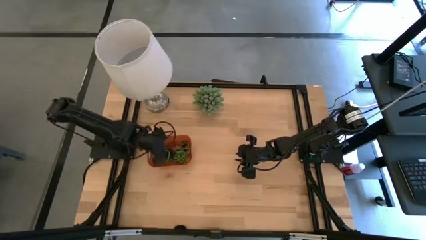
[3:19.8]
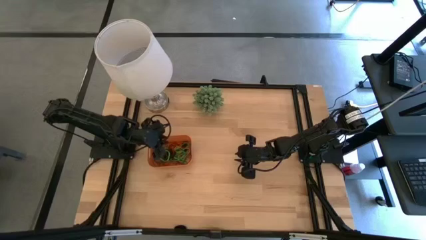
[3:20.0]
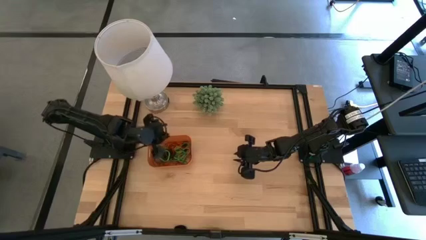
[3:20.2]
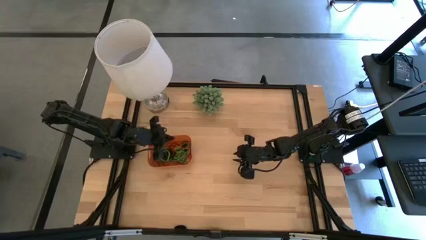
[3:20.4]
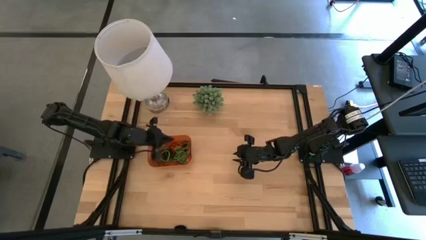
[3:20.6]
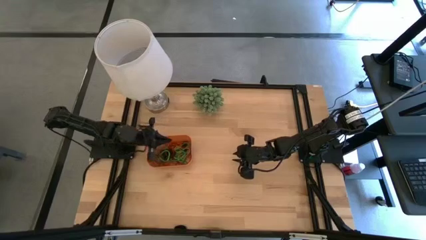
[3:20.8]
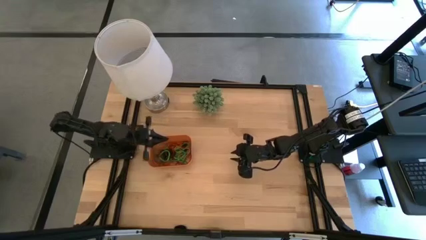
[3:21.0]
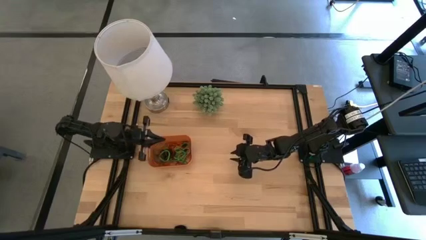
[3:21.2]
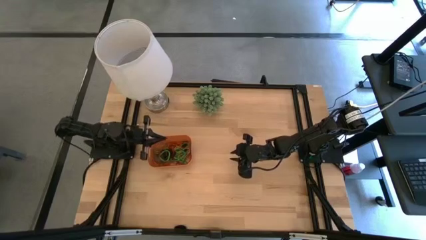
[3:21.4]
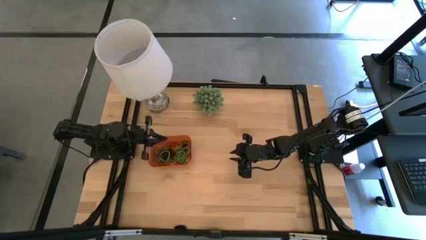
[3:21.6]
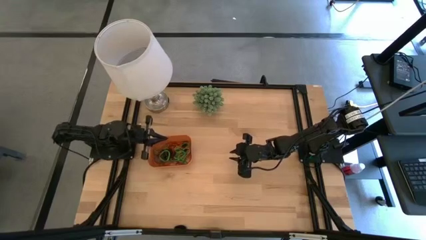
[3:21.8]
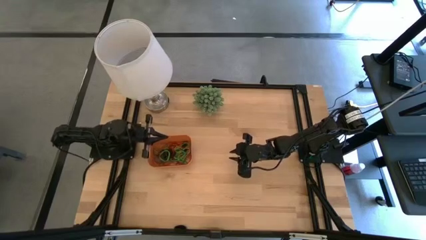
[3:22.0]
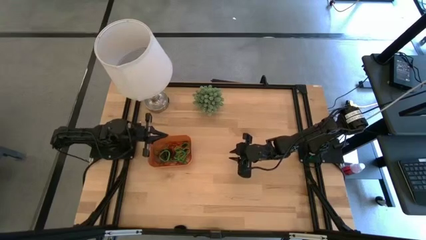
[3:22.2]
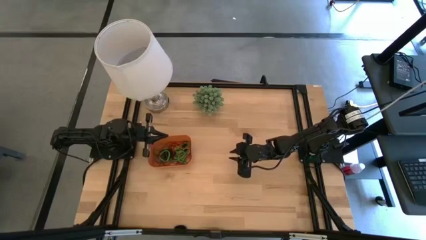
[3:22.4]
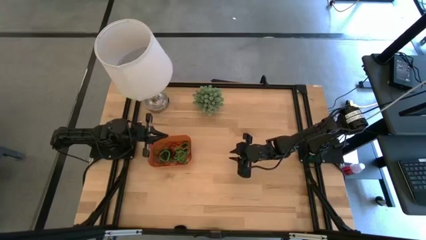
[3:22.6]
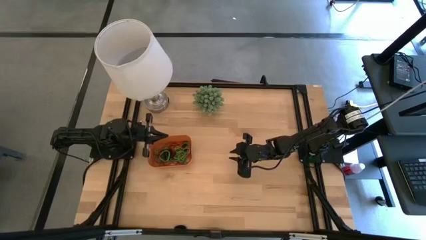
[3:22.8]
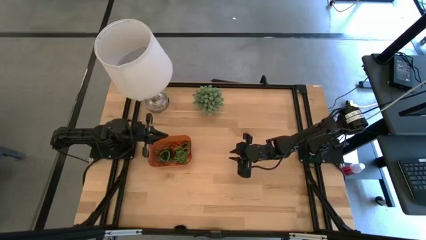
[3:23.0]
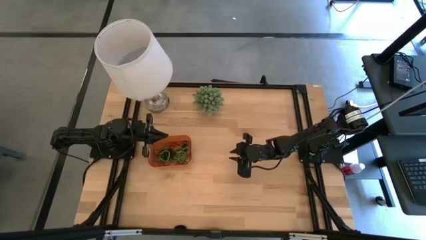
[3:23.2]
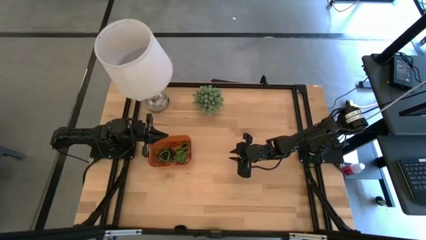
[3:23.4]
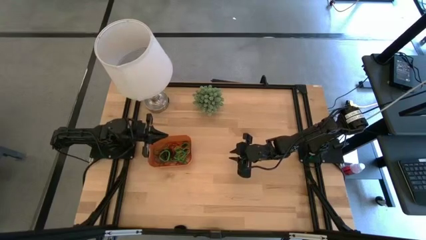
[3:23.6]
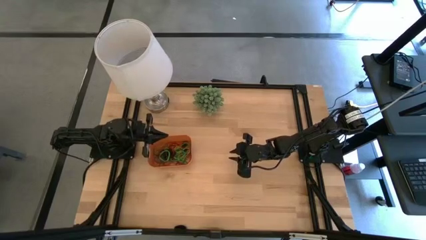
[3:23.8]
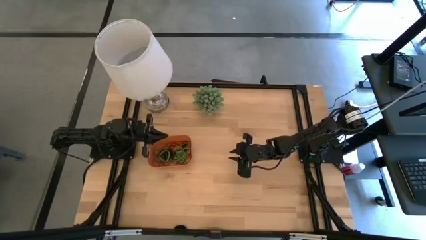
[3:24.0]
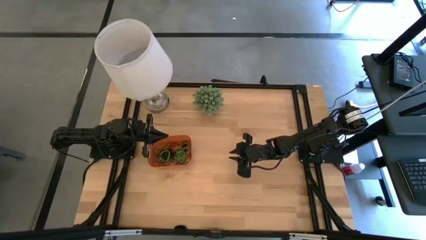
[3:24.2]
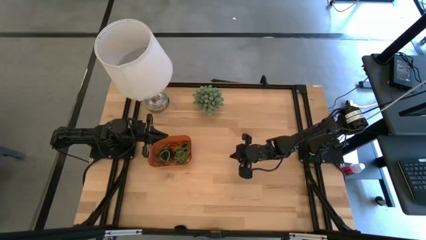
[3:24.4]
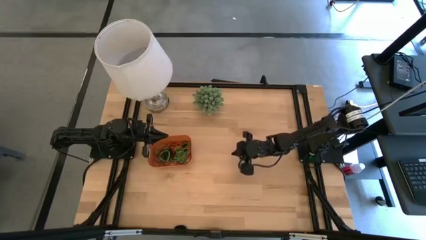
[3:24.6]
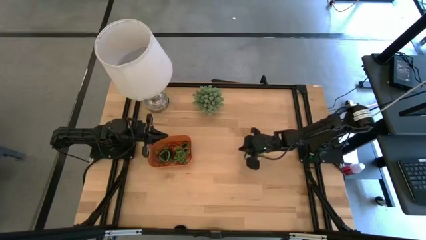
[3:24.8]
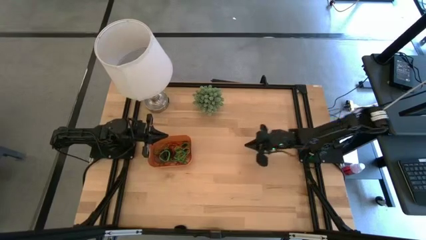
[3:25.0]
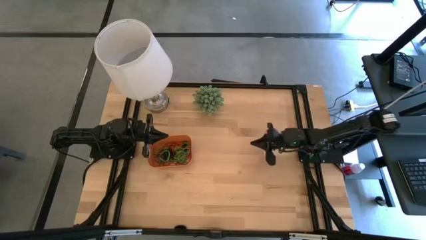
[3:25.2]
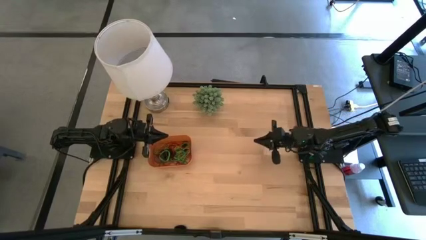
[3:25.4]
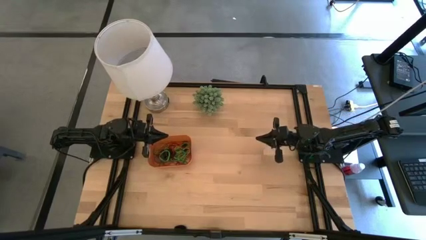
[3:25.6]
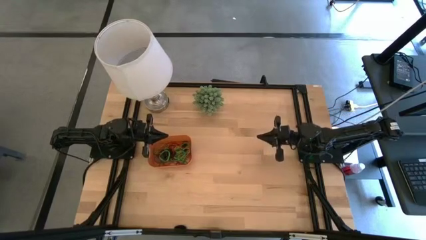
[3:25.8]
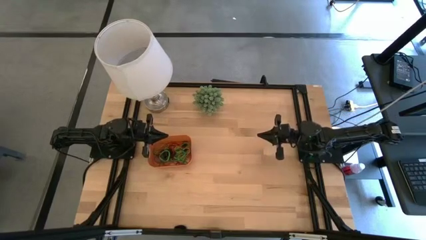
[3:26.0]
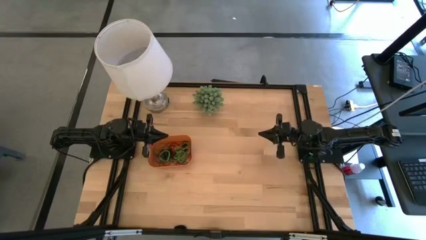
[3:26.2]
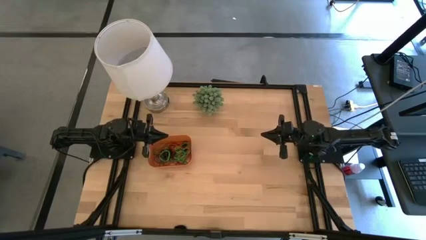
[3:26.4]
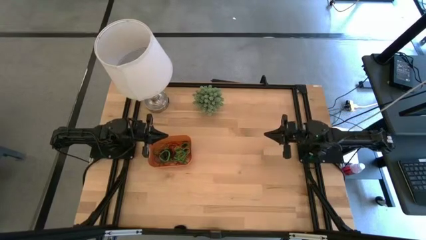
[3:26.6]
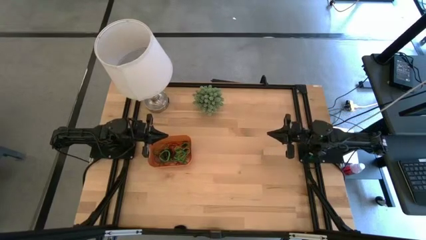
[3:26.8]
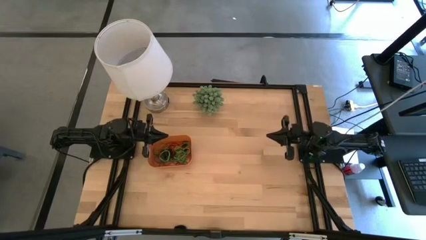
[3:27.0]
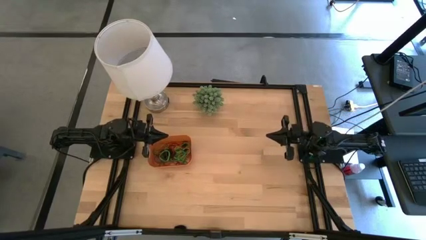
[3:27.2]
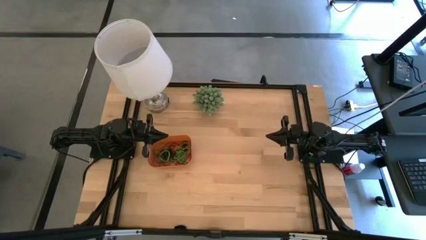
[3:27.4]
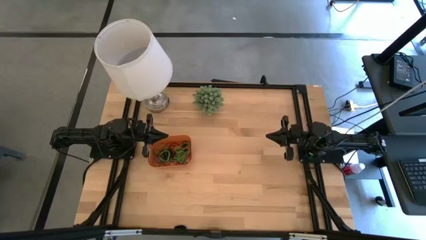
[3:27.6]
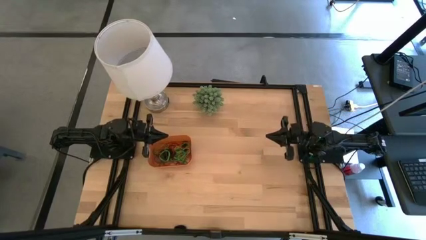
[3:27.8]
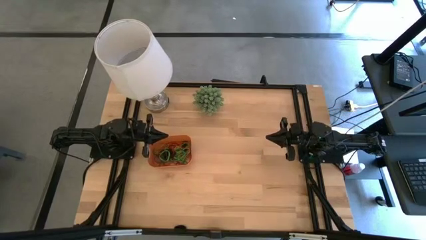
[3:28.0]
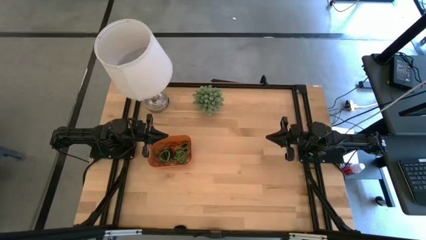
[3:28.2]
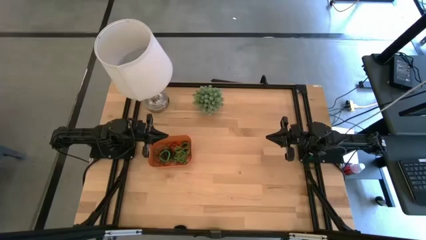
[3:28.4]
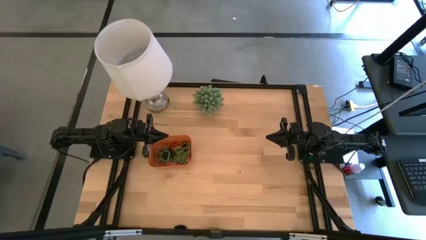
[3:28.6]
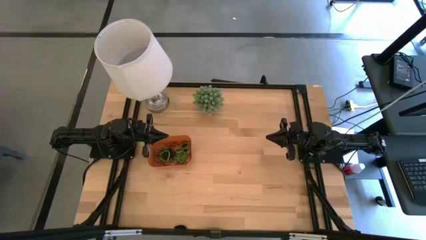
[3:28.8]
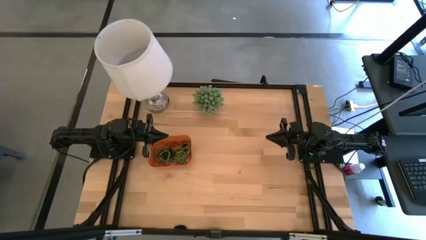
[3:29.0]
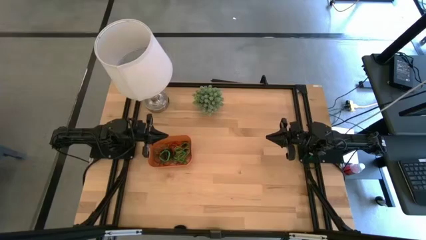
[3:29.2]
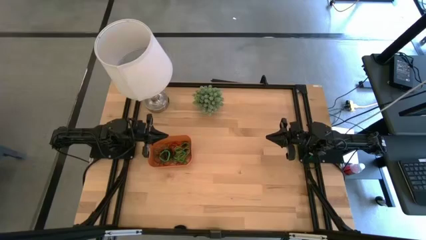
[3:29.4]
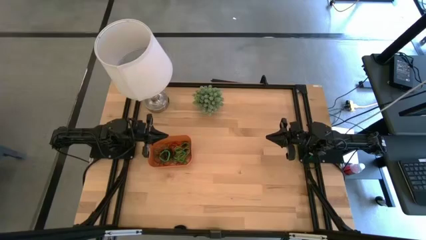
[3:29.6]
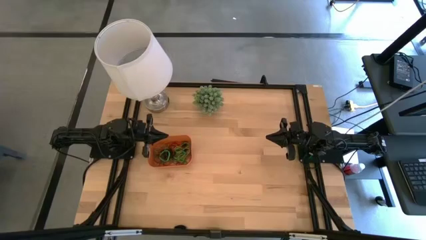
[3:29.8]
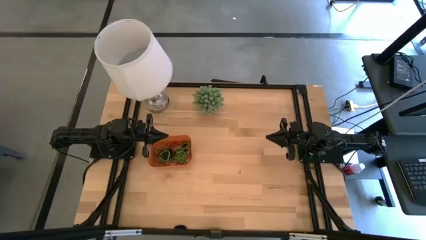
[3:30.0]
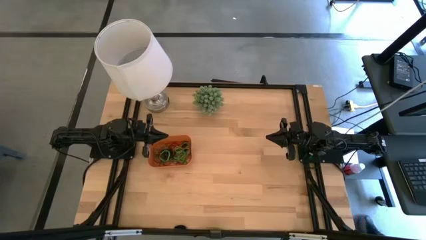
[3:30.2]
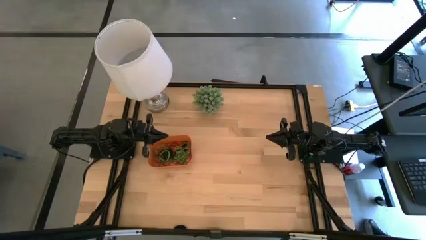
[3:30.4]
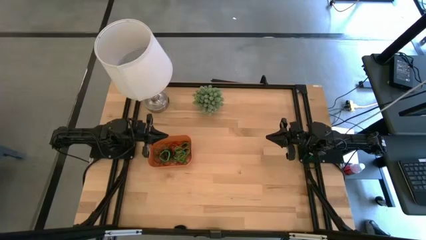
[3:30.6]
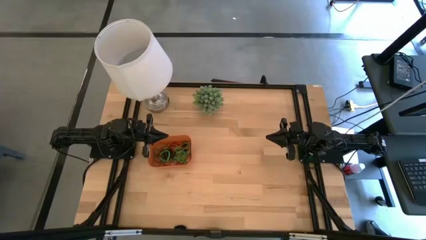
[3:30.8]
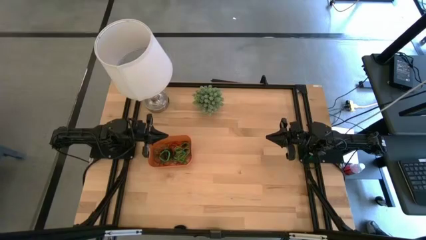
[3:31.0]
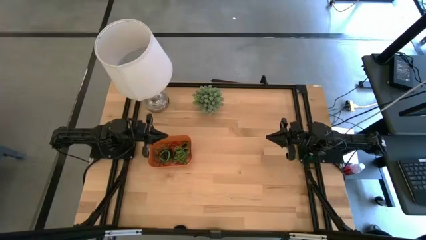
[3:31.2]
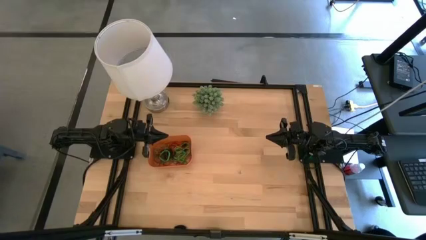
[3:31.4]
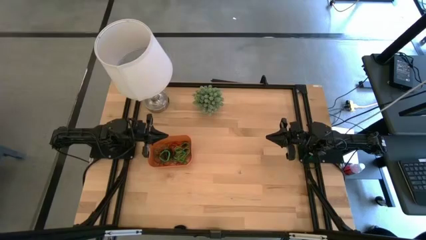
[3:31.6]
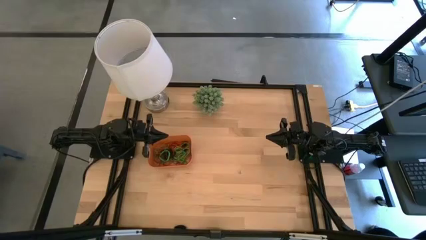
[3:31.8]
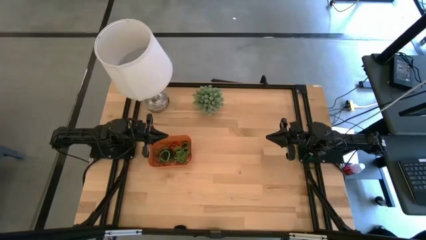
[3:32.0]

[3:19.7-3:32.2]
Task: Pick and place rubber bands into bin
Return to Home Position

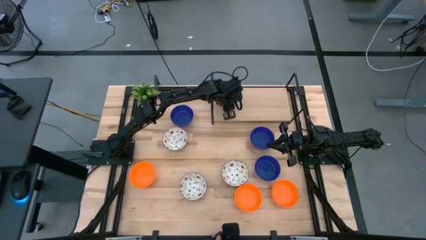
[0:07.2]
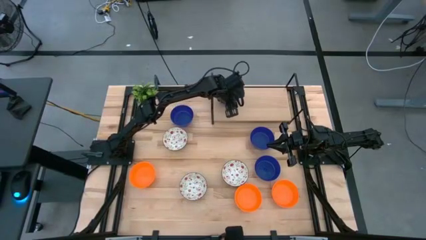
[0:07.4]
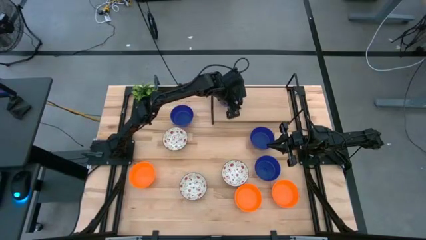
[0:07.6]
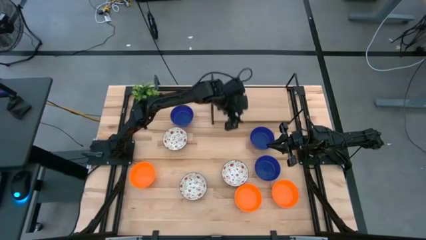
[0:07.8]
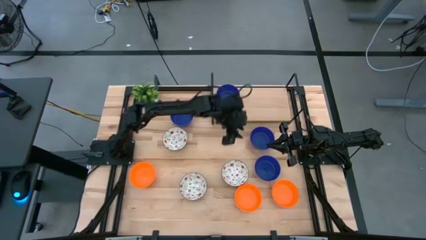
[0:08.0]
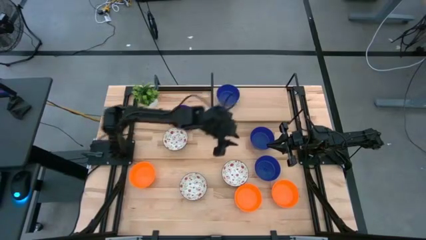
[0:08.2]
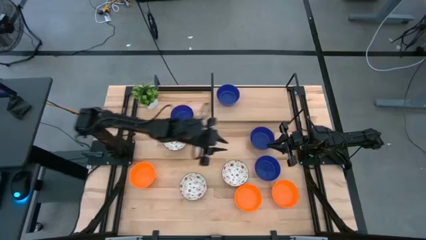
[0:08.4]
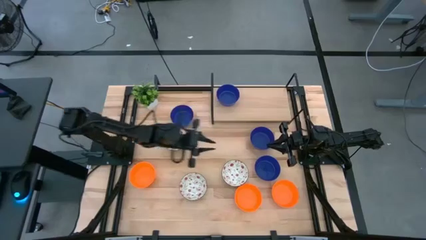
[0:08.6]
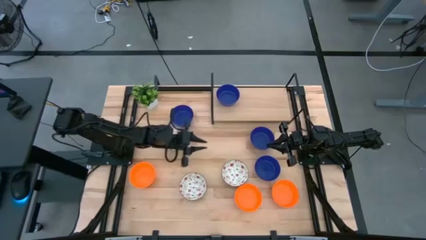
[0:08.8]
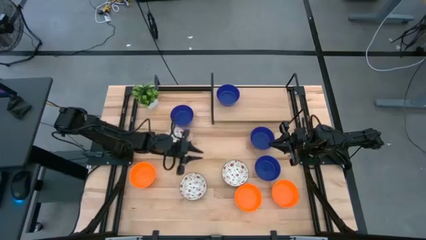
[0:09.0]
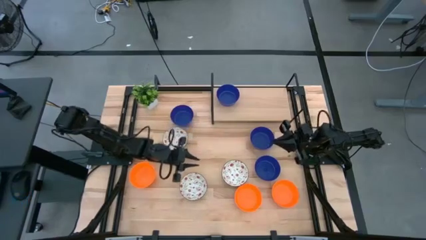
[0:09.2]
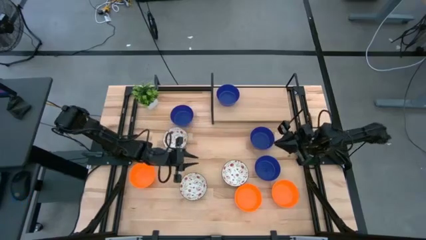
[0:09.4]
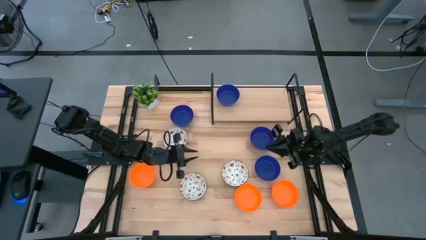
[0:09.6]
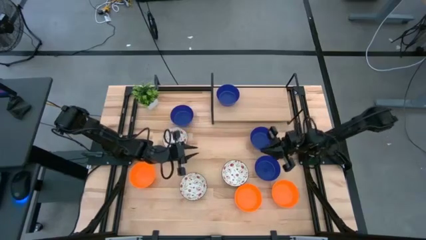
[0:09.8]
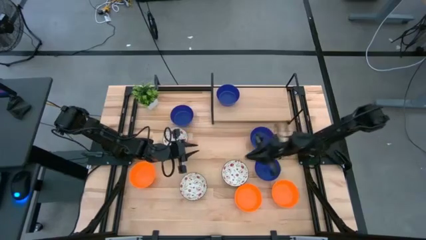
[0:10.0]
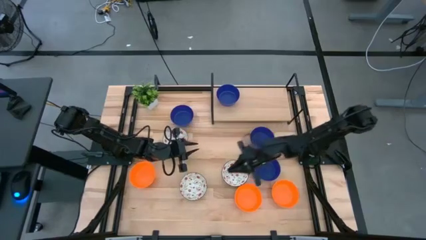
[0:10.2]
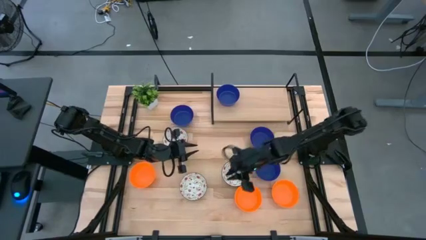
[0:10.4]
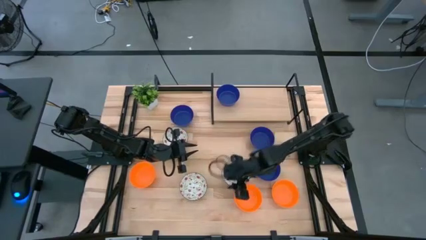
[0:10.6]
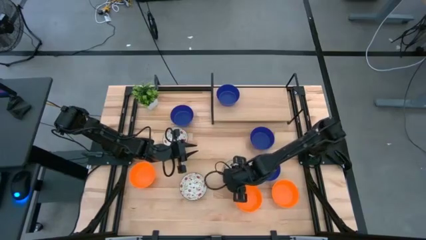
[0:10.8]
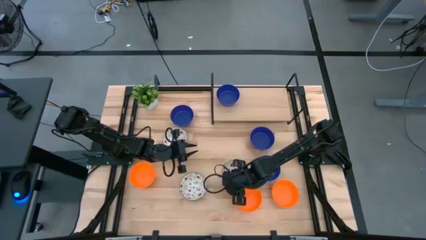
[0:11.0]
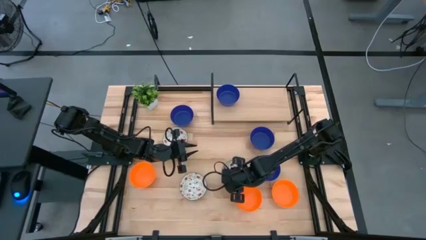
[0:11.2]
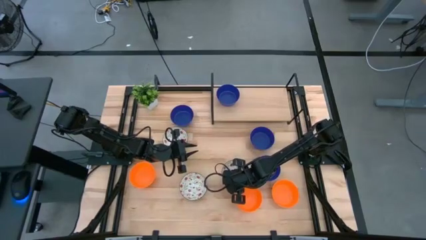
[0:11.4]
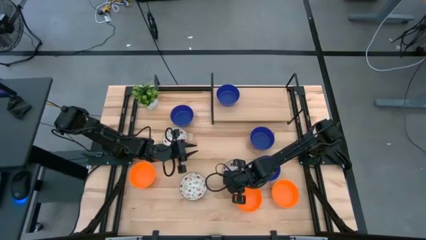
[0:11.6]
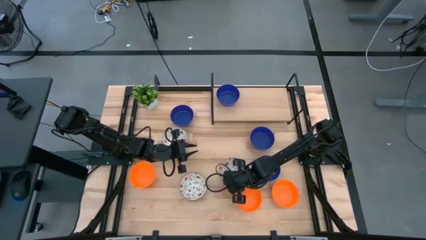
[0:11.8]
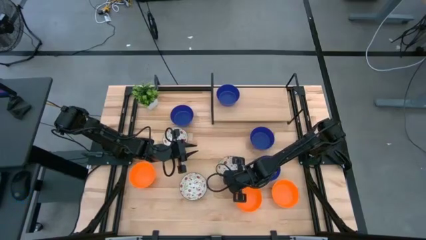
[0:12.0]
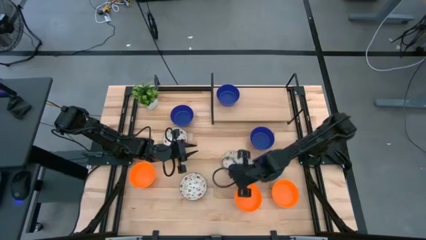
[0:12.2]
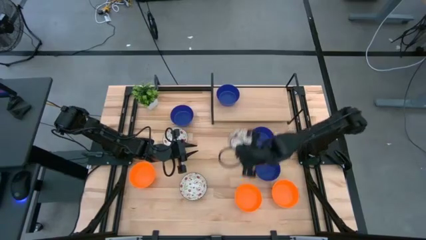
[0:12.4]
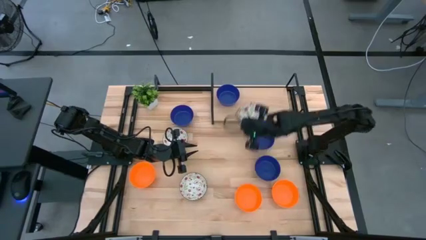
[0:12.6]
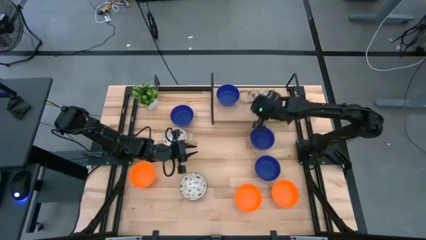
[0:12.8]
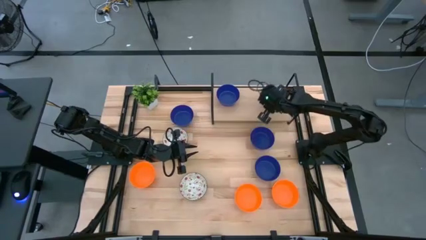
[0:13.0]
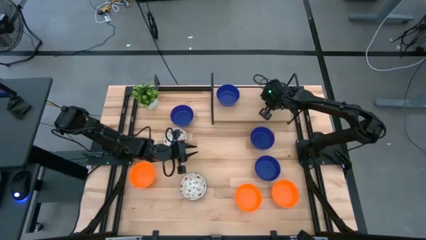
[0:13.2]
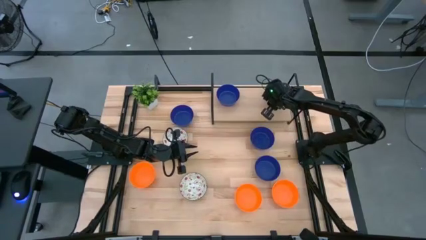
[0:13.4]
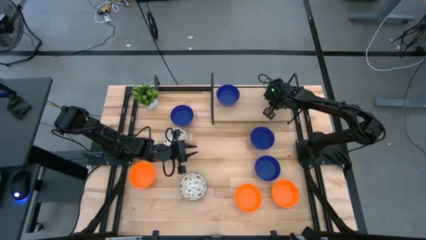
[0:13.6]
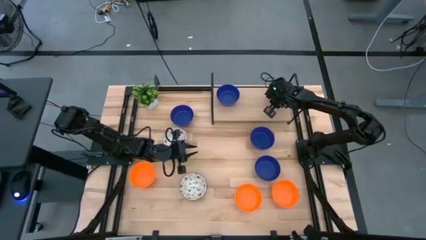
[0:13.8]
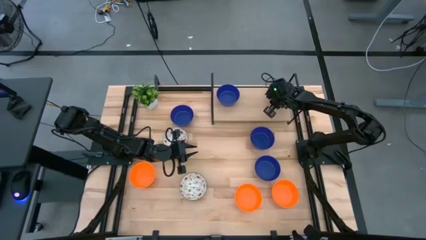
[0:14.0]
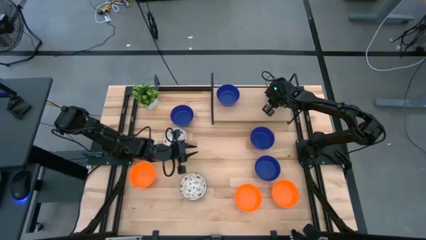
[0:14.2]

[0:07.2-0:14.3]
Task: Pick & Place Mini bowls
Put the white patterned bowl on the shelf
